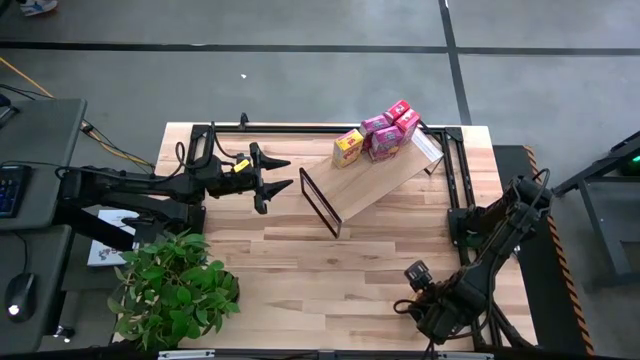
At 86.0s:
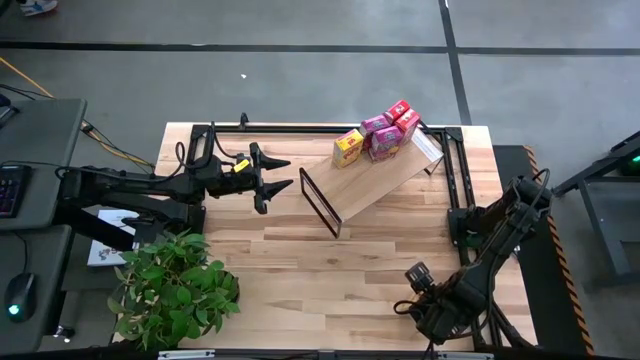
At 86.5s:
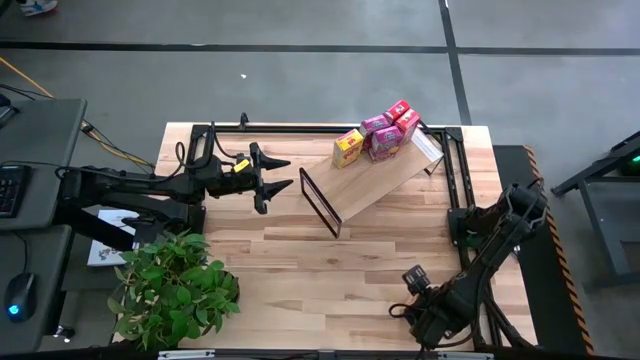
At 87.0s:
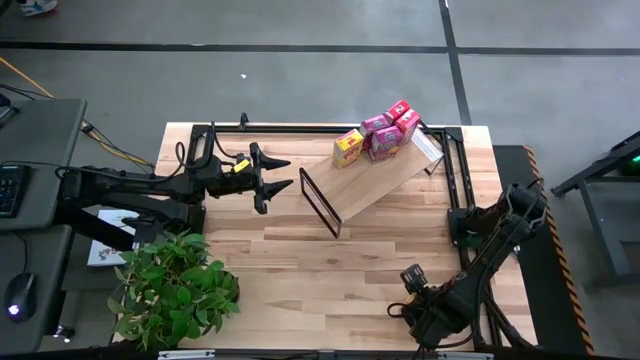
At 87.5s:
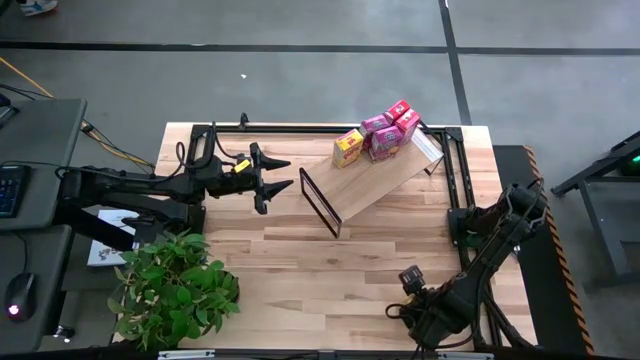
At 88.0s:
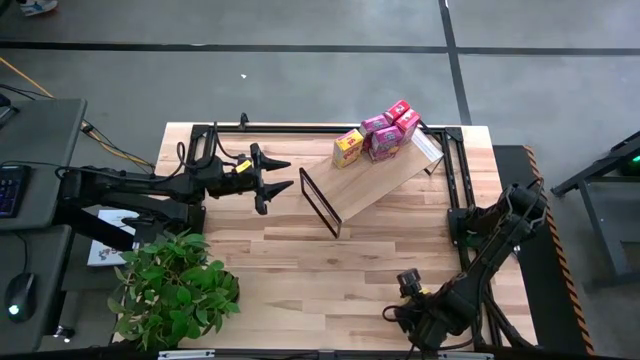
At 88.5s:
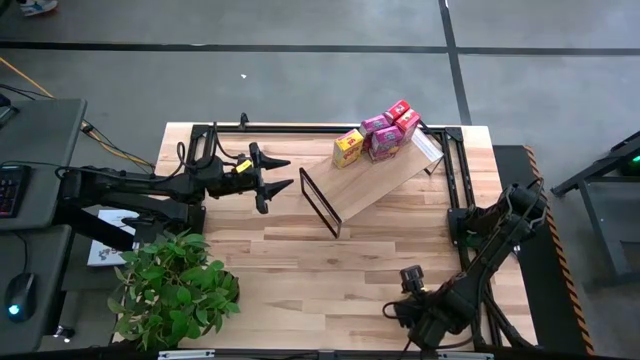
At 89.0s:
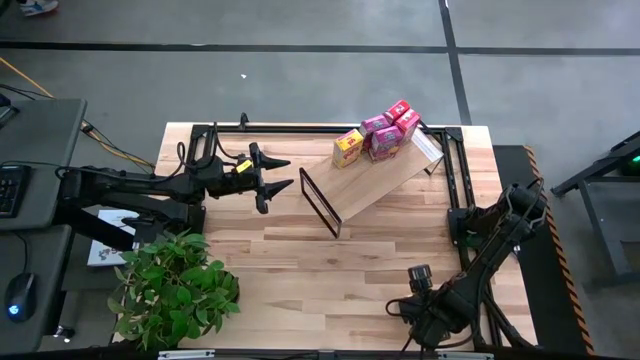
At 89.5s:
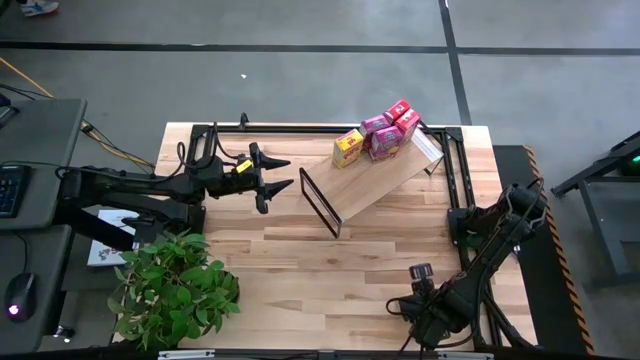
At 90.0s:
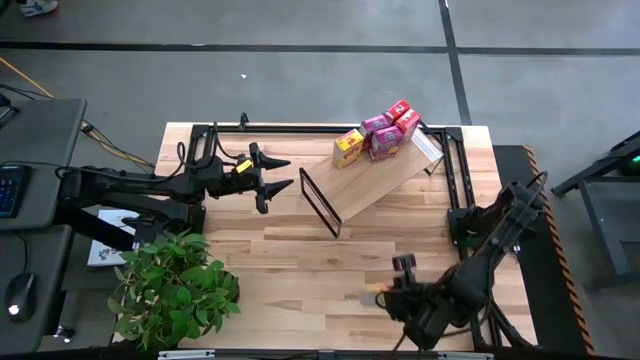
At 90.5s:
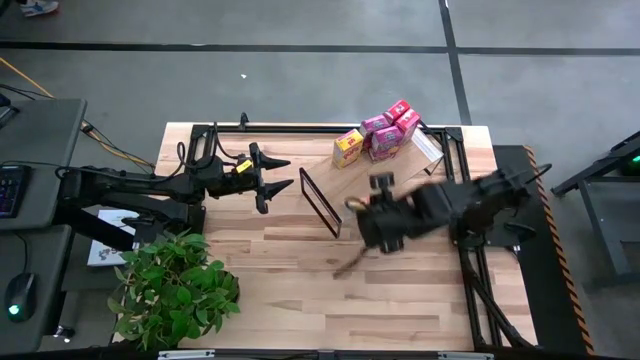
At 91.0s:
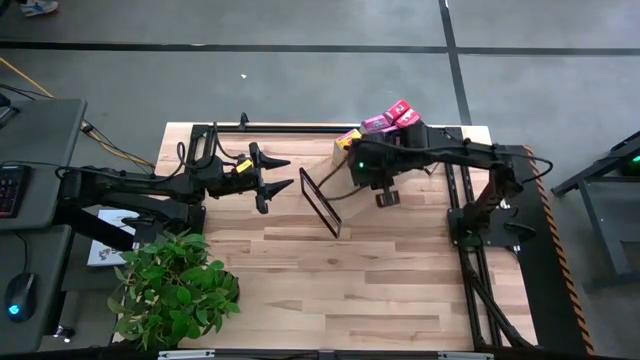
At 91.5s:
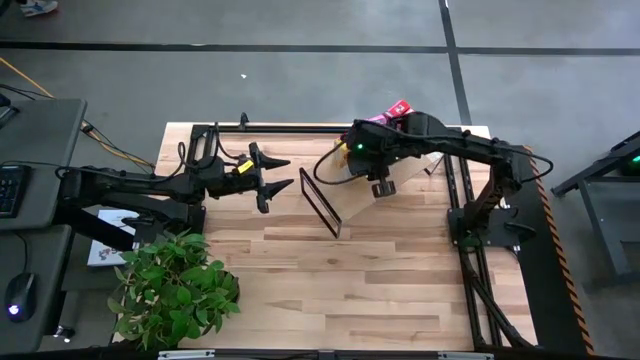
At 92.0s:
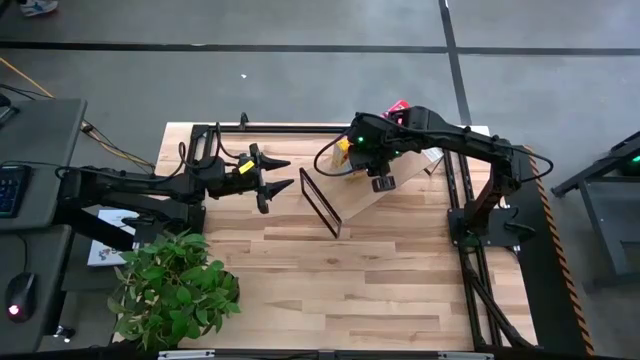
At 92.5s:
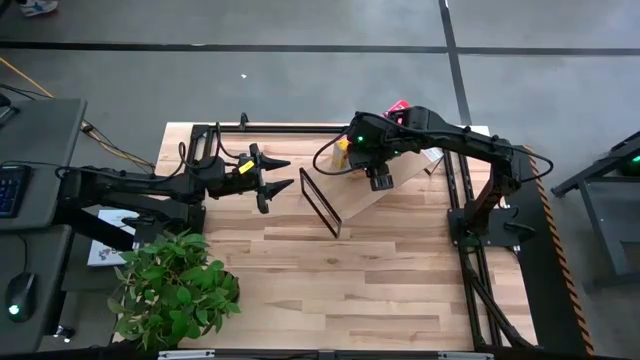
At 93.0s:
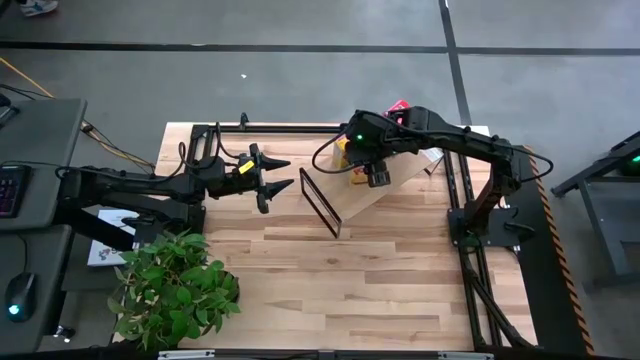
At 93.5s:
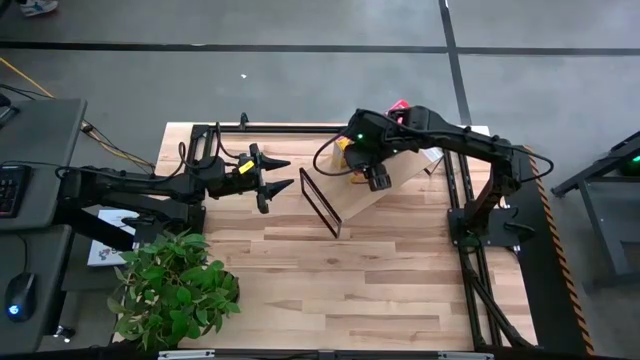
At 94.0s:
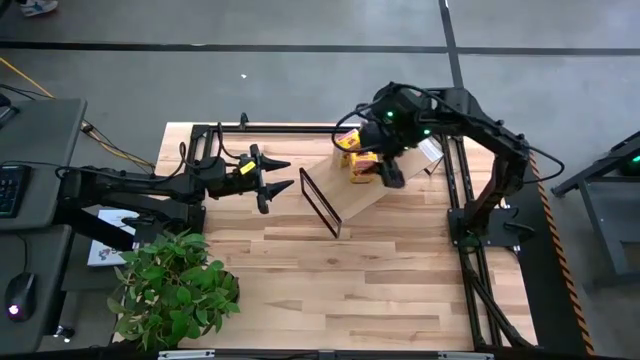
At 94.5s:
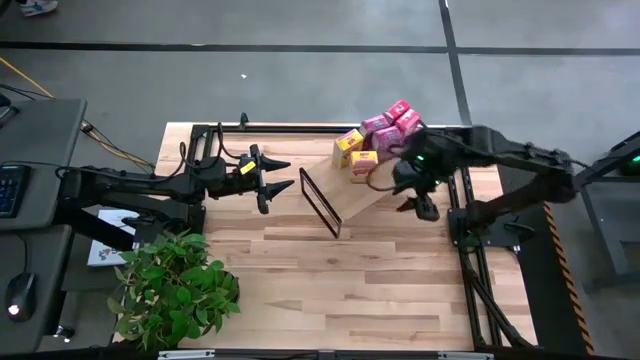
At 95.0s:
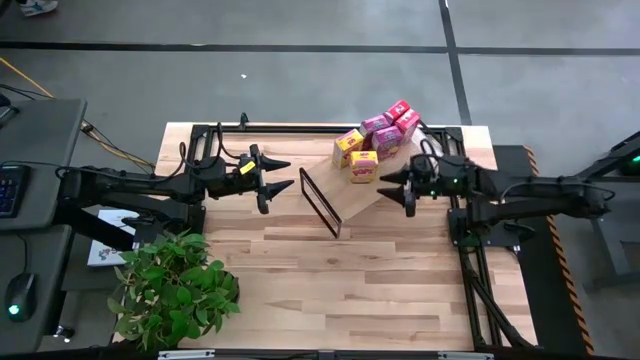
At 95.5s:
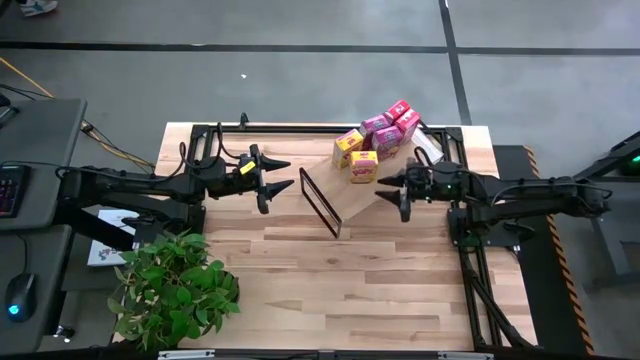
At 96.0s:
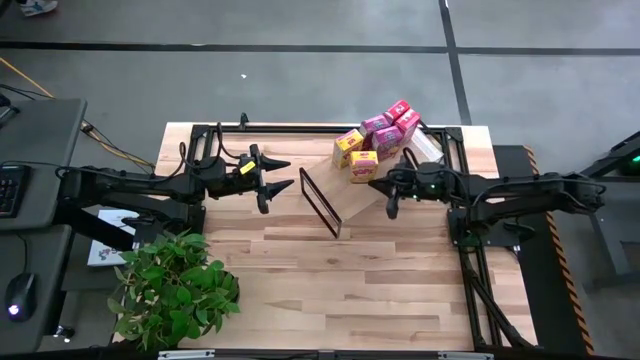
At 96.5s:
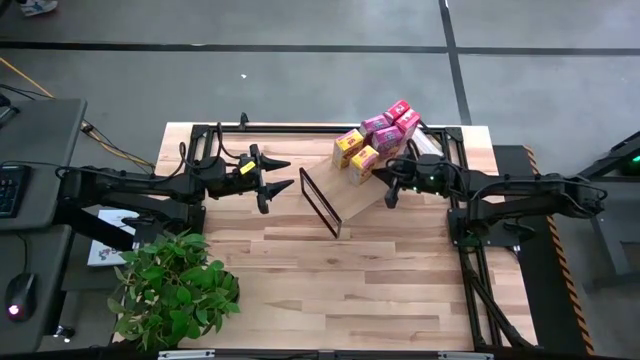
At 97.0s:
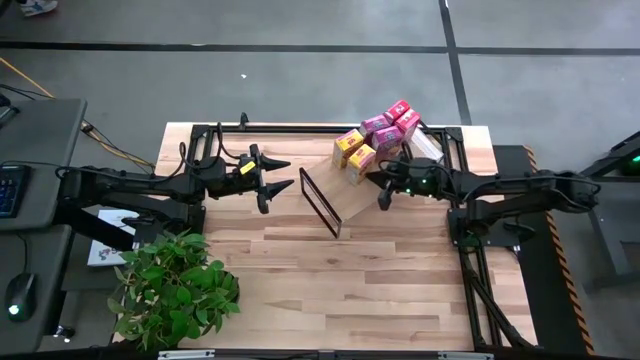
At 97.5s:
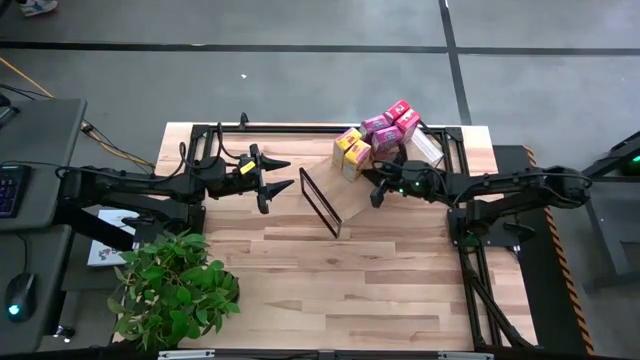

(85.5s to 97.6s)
Task: Stack cereal on shelf
Put the yellow cereal box on the shelf aligned with the other yellow cereal box

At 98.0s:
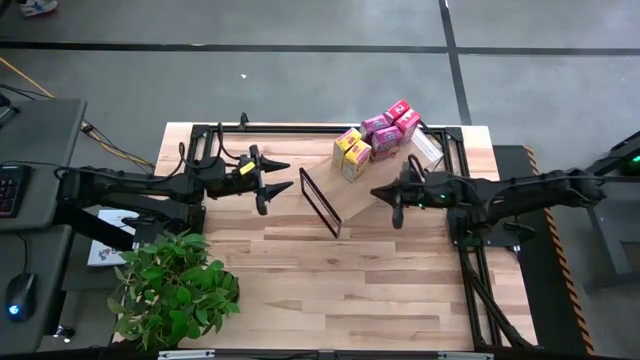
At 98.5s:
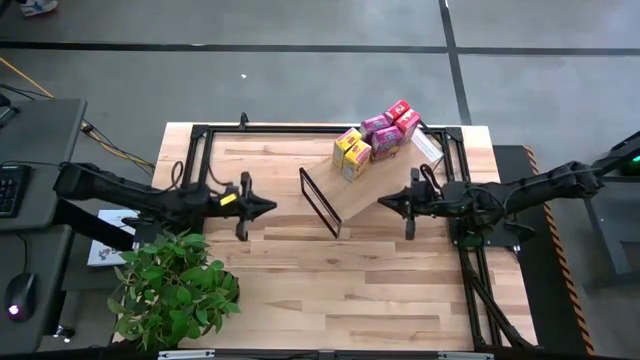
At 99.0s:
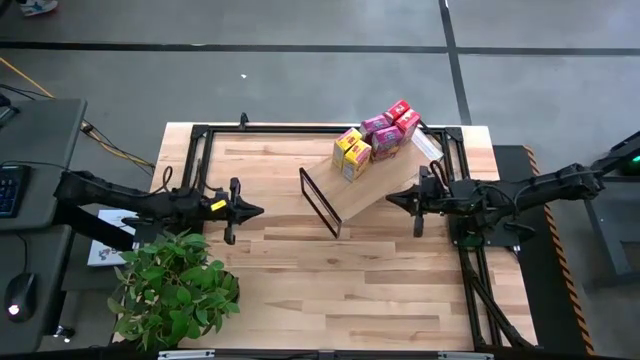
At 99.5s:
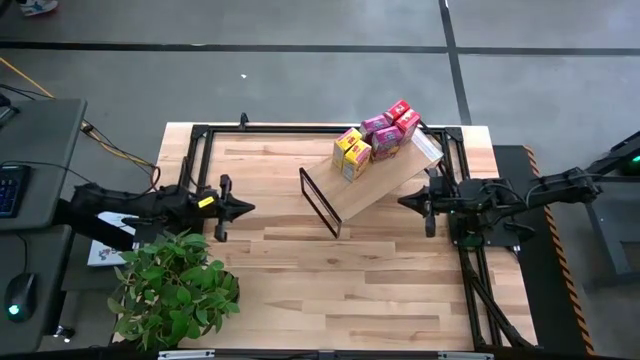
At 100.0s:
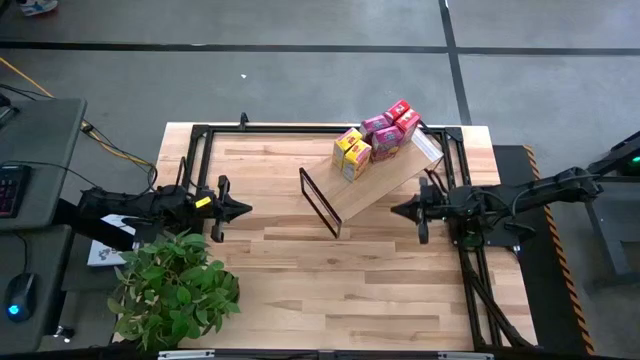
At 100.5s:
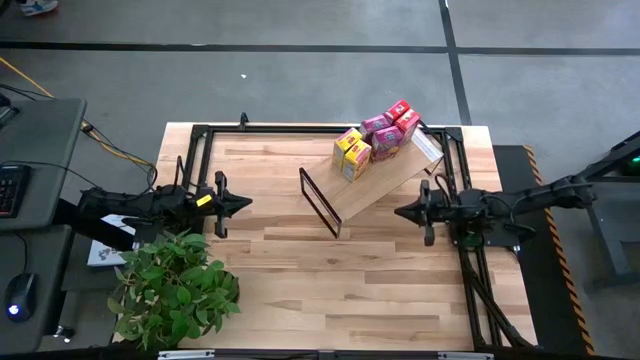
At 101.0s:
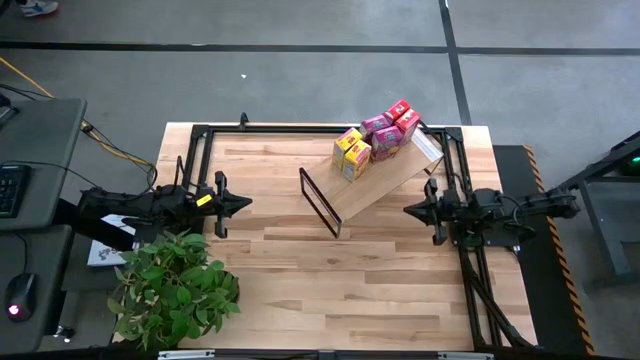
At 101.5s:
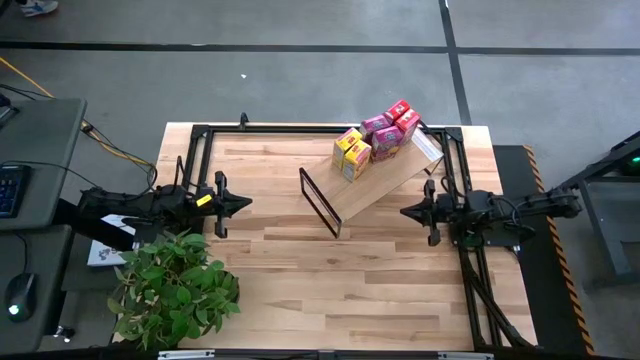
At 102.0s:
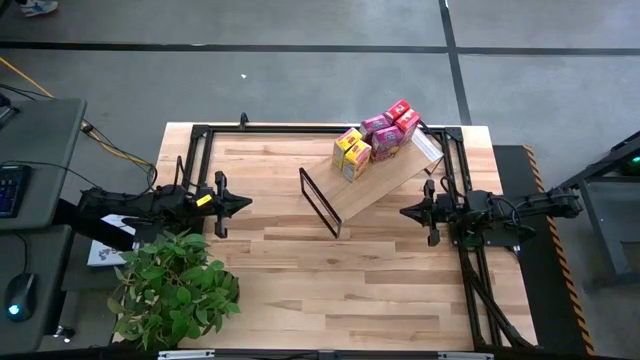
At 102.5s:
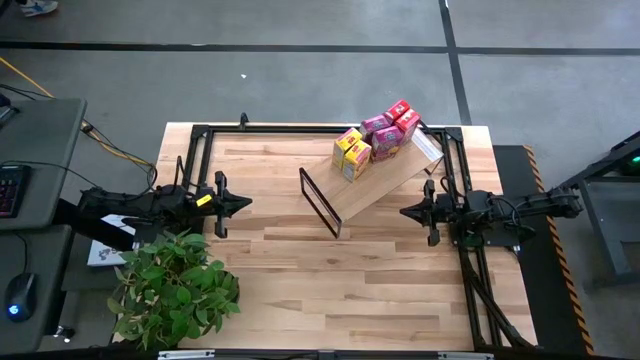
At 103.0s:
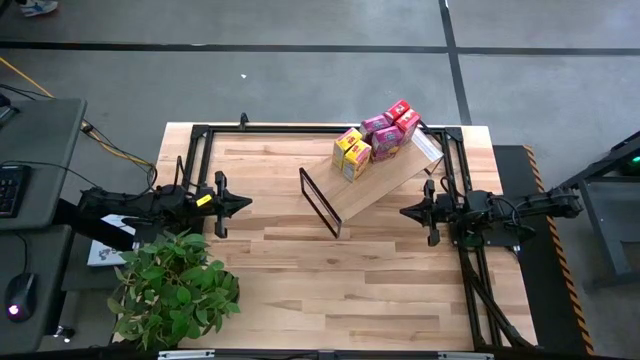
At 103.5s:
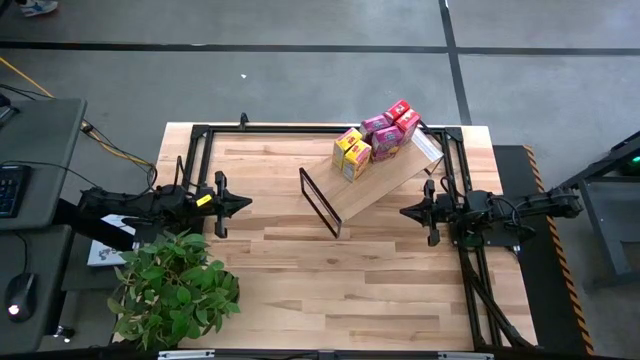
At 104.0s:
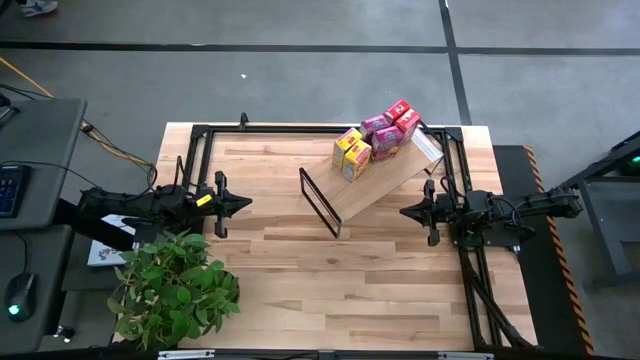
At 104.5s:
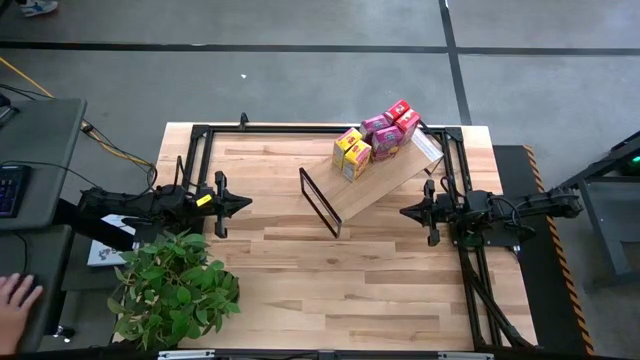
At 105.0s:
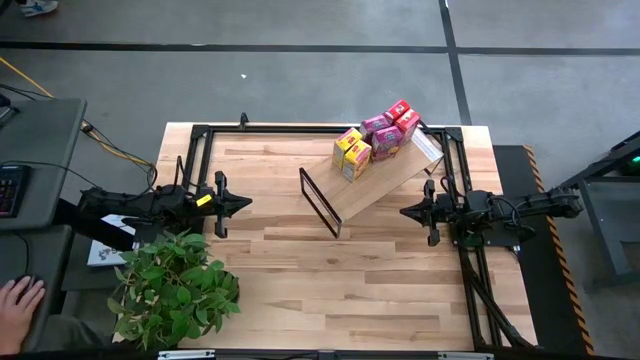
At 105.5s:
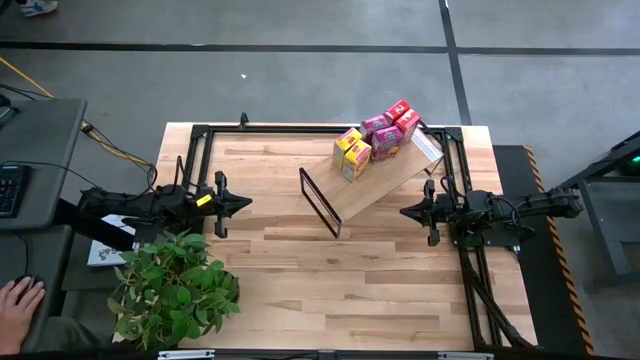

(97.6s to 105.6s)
Return to Home Position
